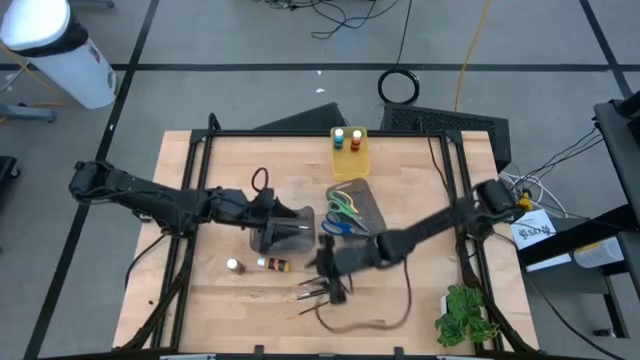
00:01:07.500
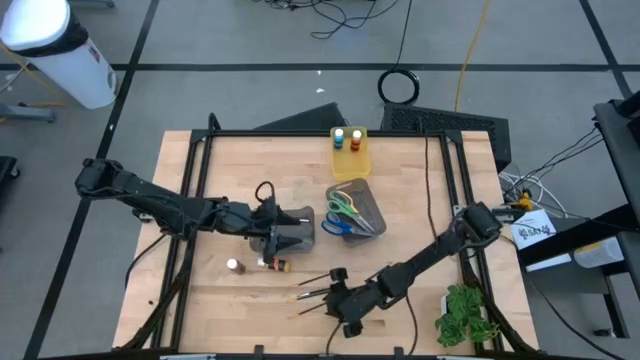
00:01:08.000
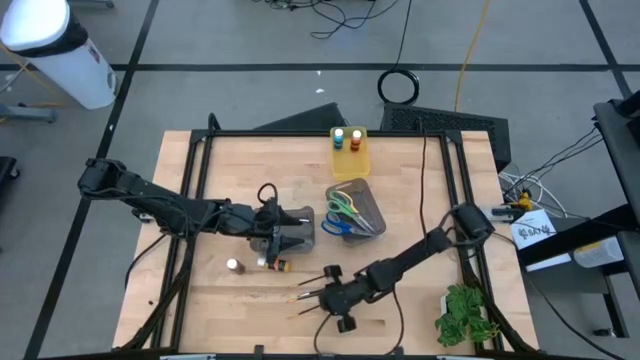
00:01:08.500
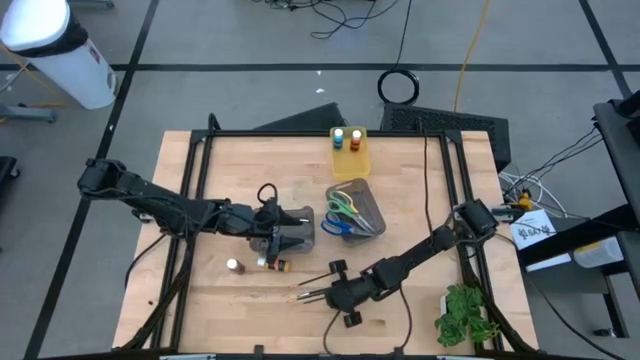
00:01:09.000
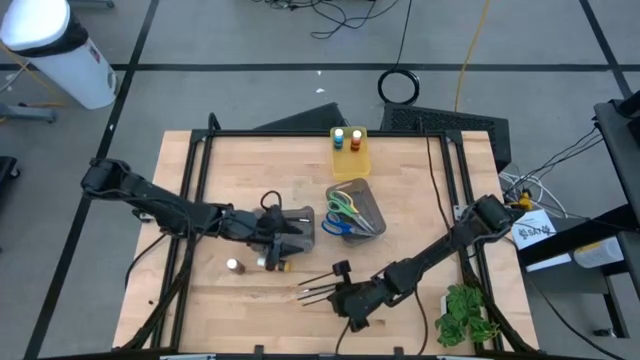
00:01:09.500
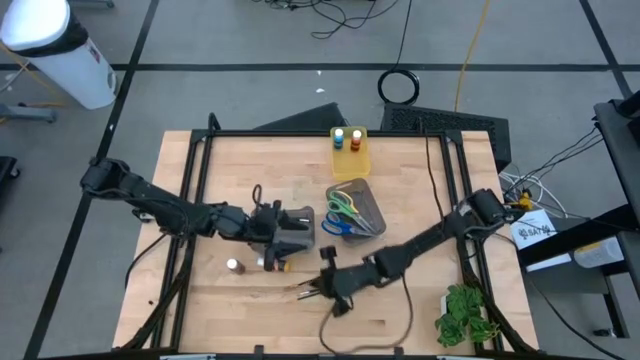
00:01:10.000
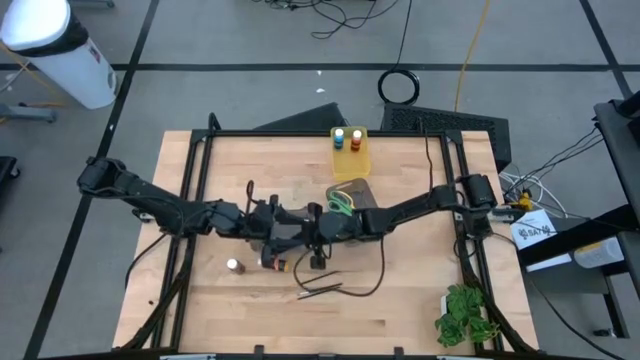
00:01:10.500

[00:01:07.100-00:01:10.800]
Task: Pick & Place Paint Supplies
Put the bottom gold paint brush into the left black bin

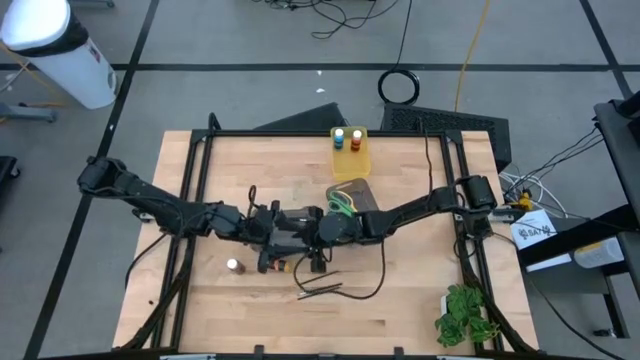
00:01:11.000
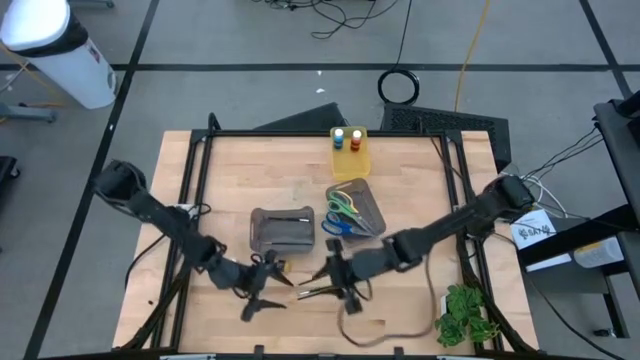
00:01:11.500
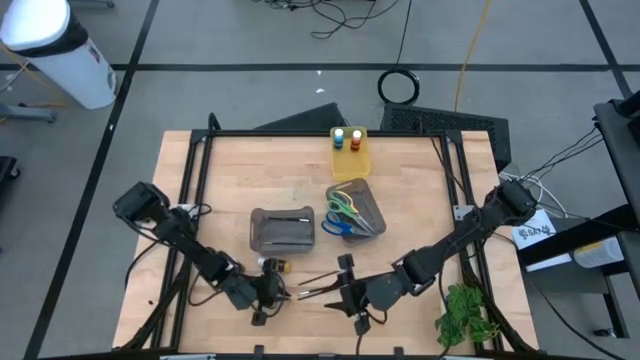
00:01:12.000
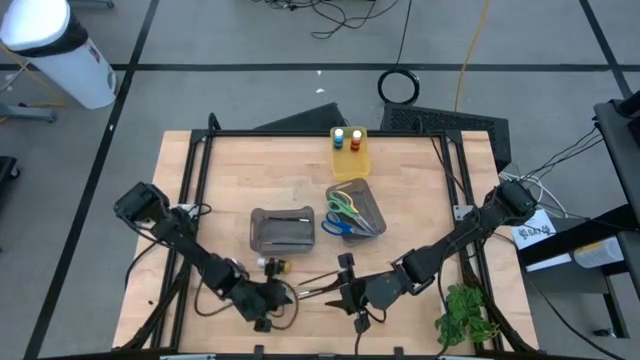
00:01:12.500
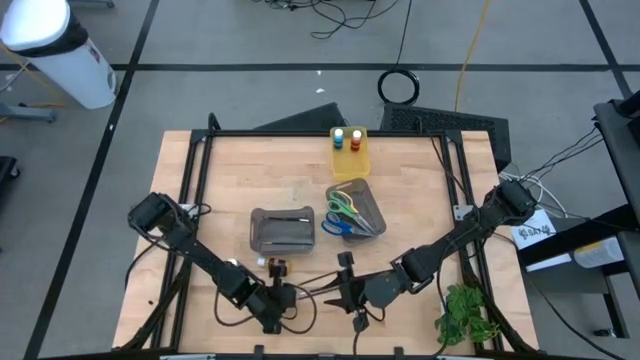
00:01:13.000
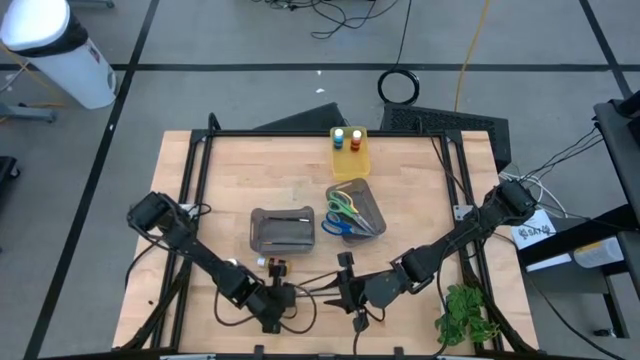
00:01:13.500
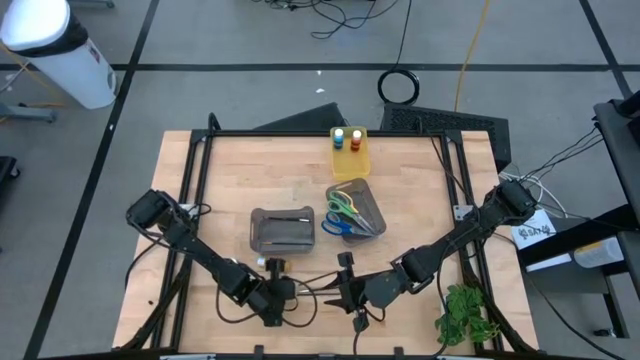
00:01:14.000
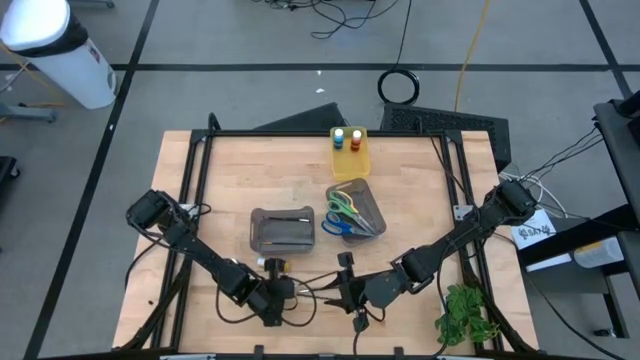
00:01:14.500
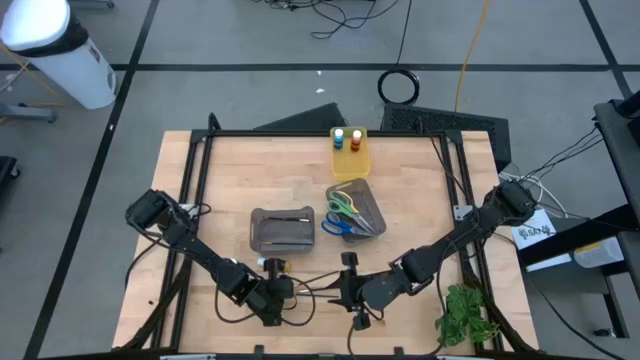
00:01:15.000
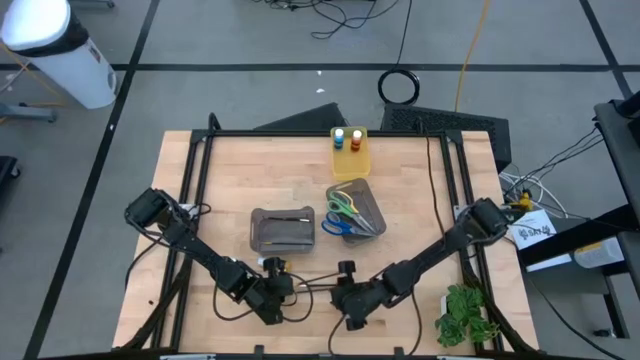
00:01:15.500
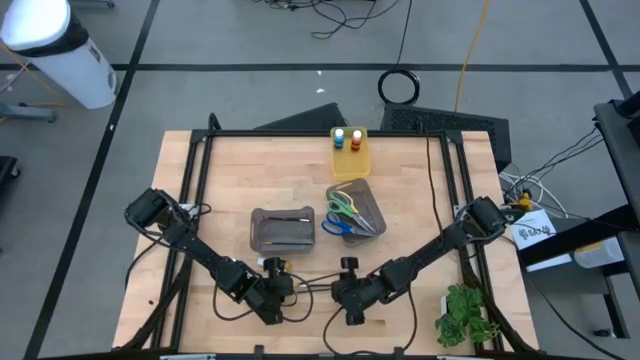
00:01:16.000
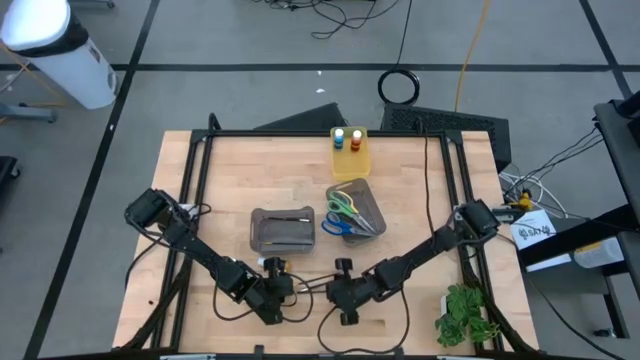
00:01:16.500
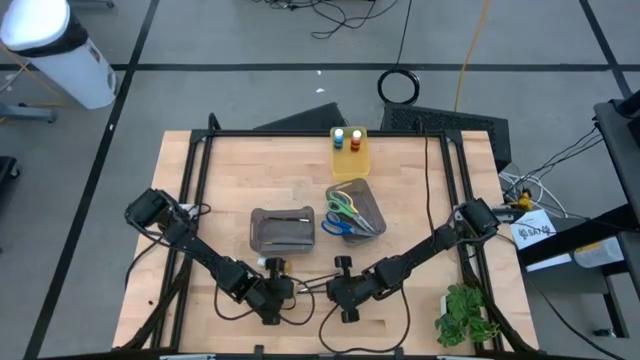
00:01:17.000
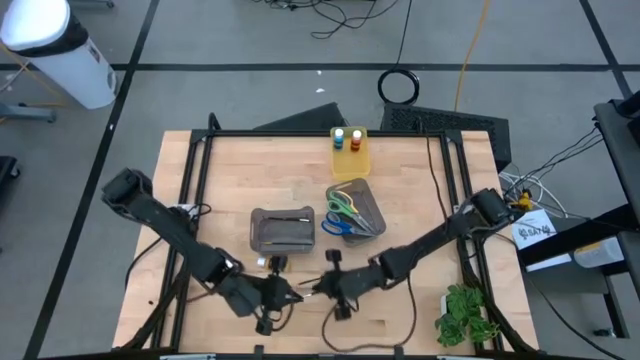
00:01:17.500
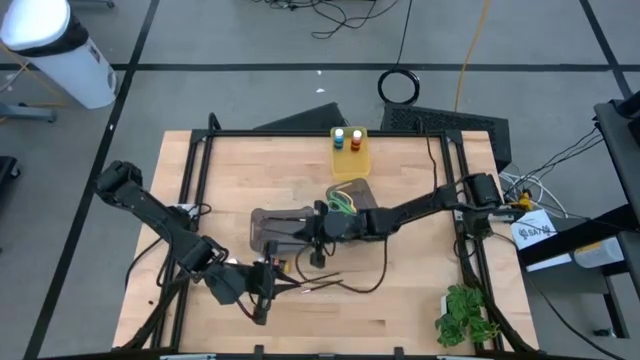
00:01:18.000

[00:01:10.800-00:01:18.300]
Put the bottom gold paint brush into the left black bin

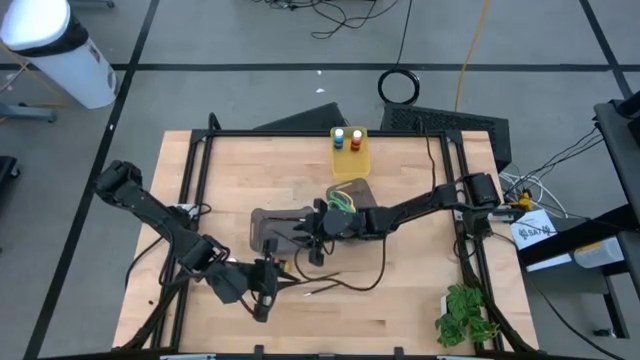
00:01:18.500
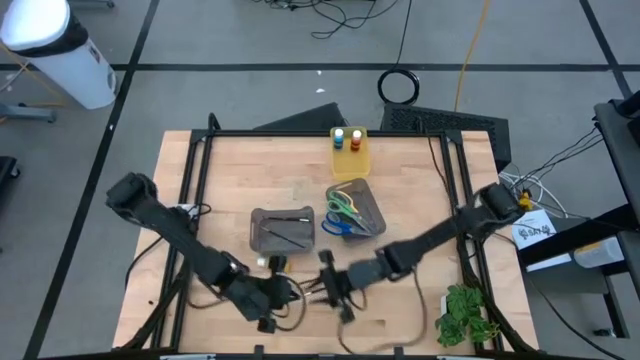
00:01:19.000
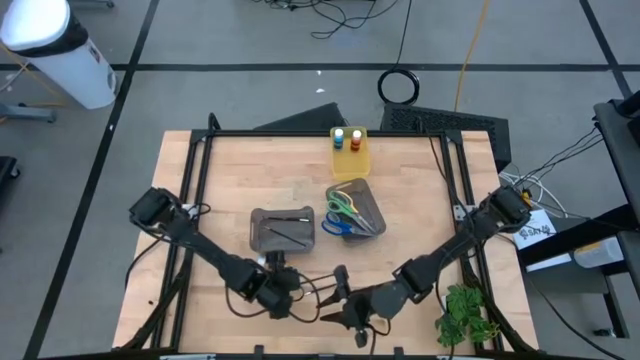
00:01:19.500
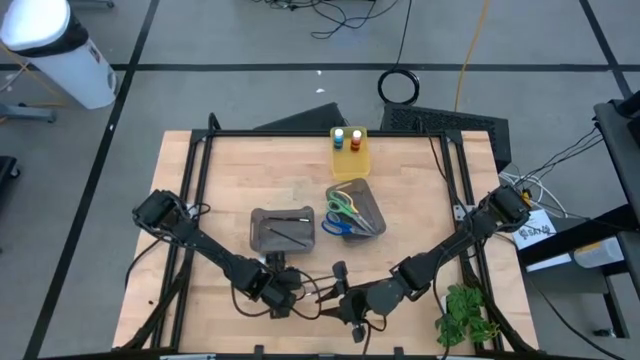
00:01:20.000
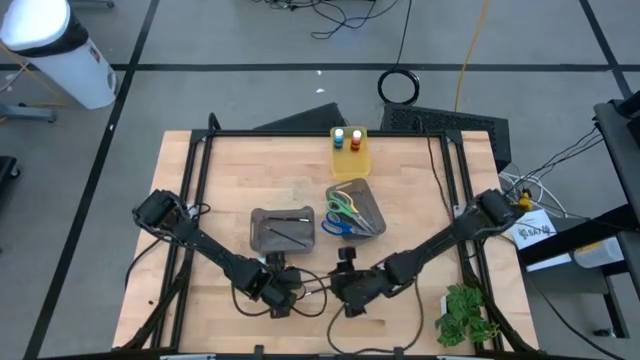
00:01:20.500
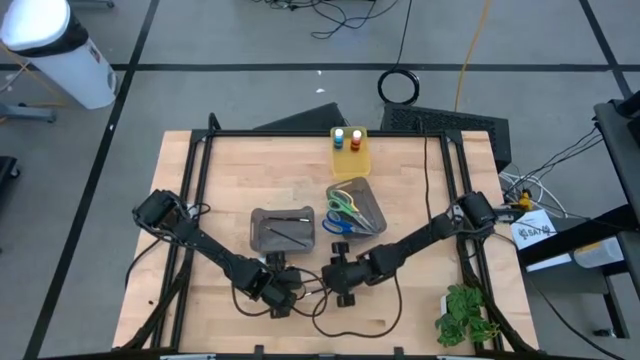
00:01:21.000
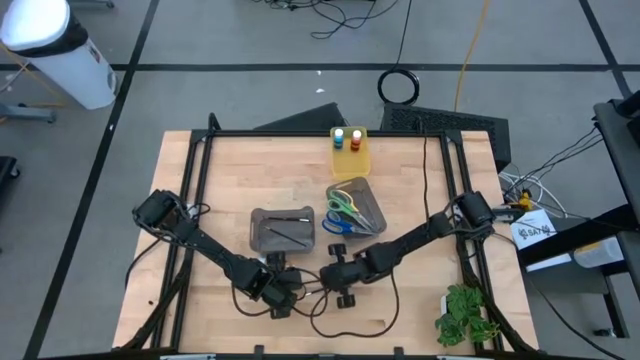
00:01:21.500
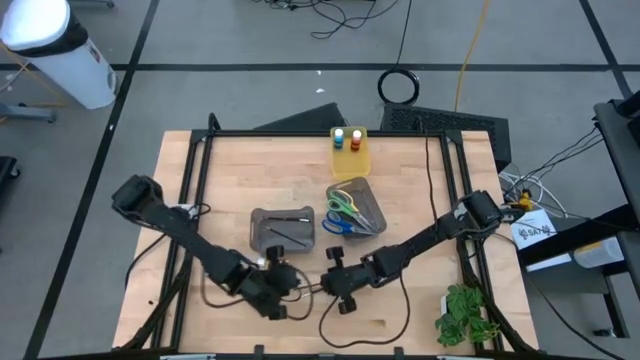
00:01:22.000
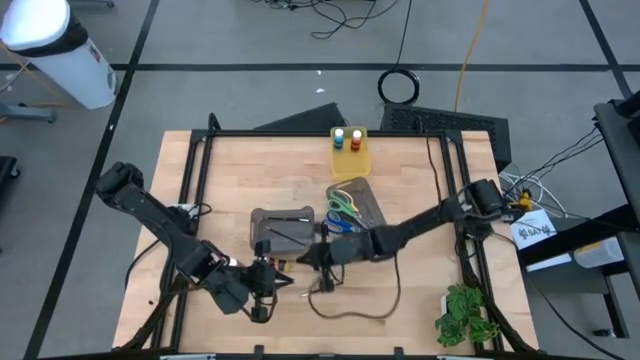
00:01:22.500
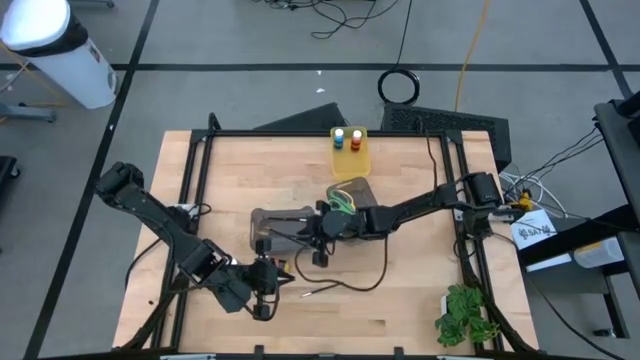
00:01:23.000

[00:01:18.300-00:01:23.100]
Put the gold paint brush into the left black bin

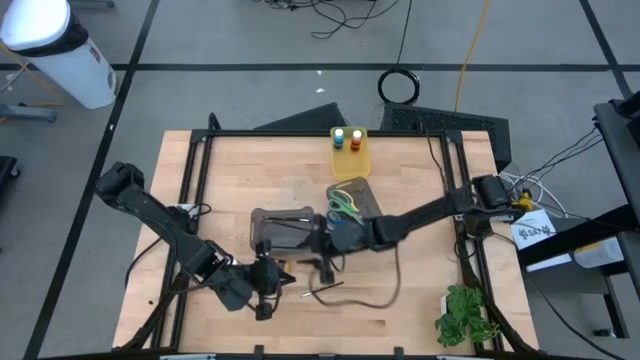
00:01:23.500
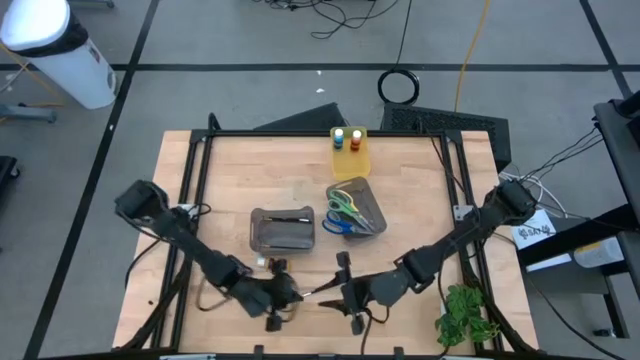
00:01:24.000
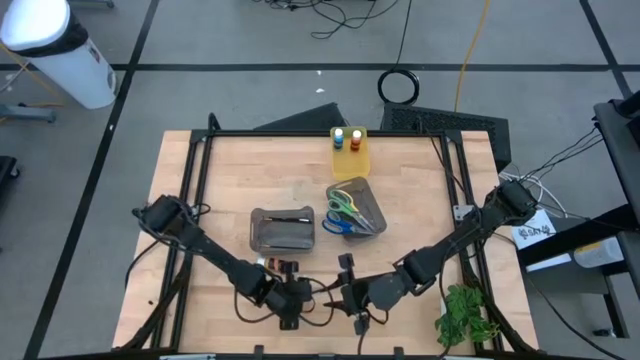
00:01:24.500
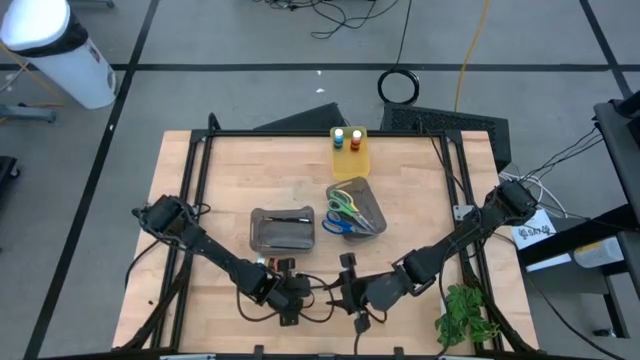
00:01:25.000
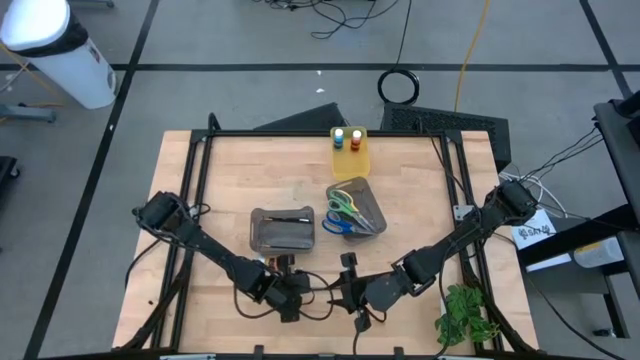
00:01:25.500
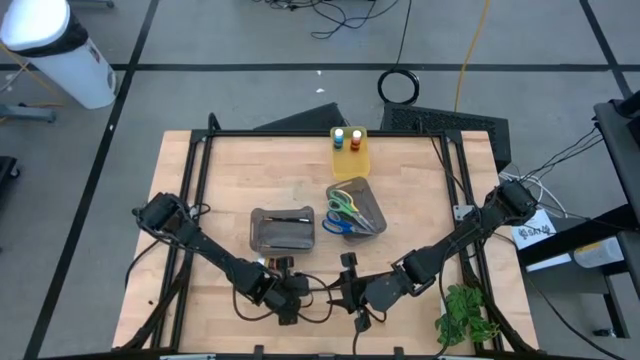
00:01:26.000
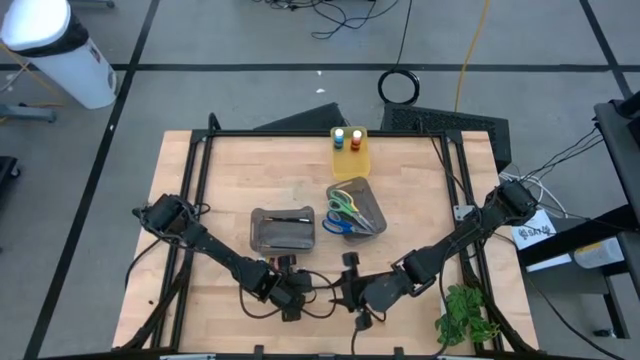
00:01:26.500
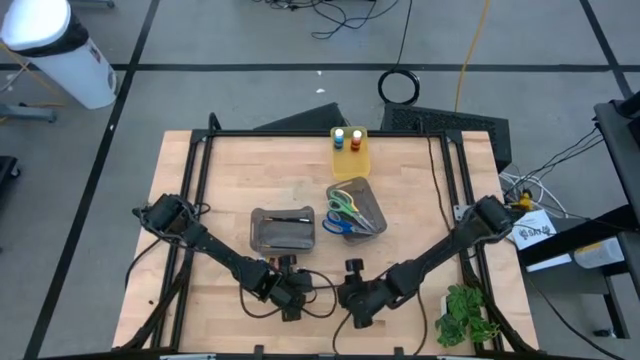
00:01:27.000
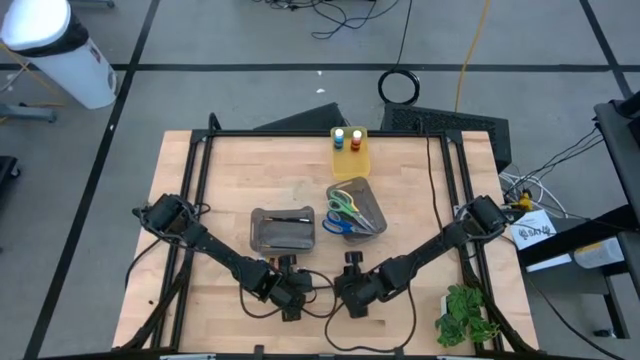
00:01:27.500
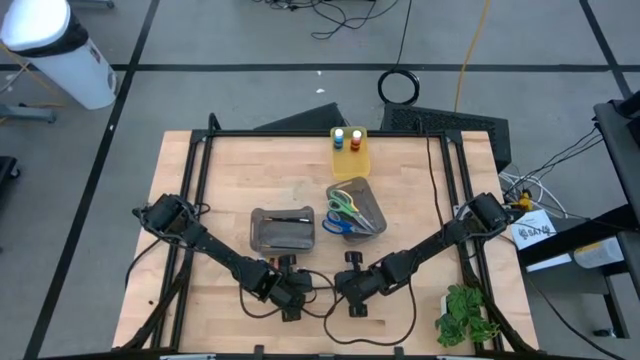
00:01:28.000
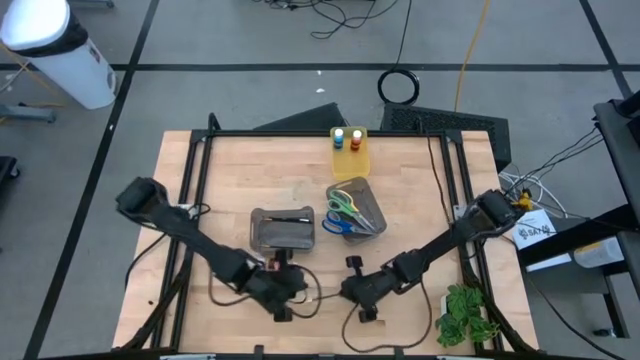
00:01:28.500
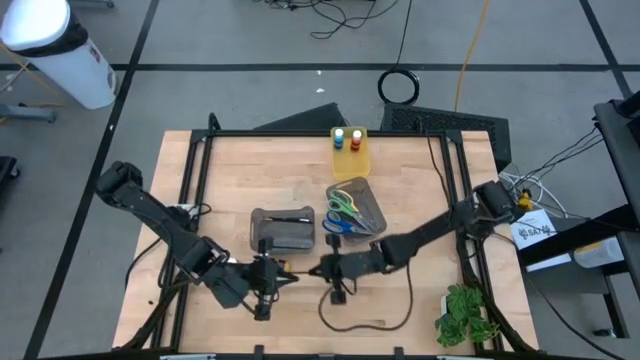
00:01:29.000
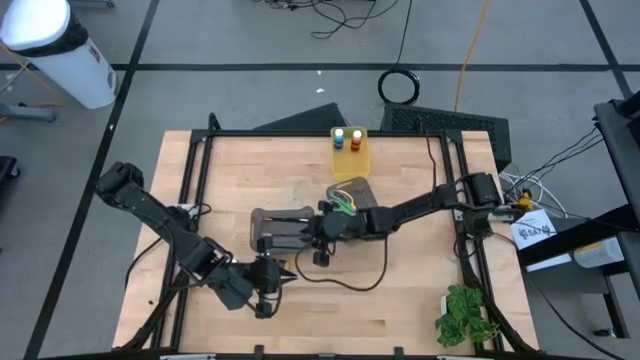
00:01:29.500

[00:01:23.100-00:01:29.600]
Put the silver paint brush into the left black bin
